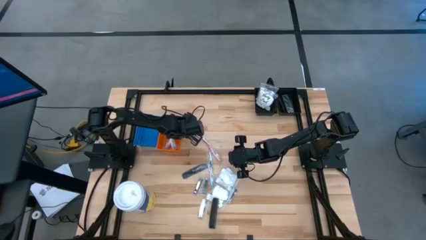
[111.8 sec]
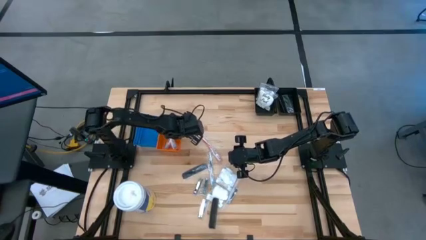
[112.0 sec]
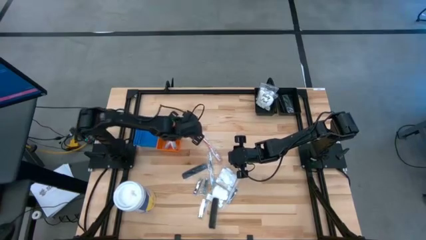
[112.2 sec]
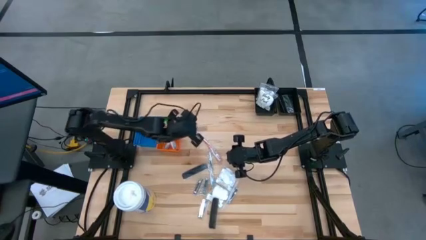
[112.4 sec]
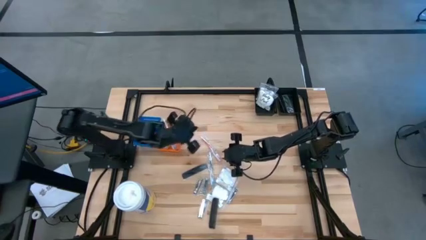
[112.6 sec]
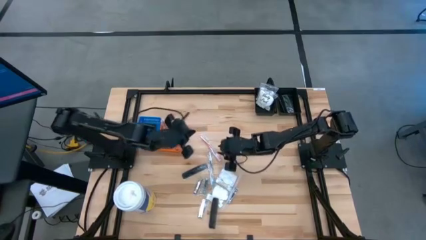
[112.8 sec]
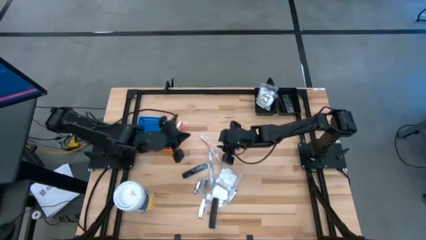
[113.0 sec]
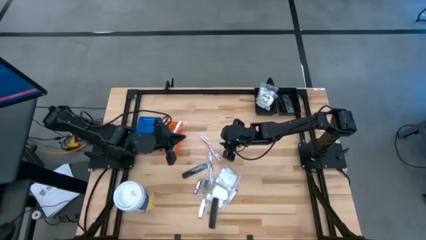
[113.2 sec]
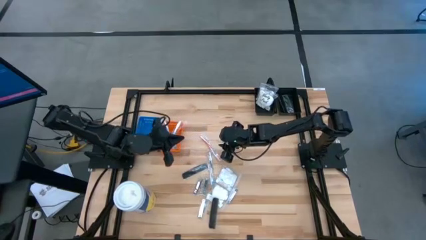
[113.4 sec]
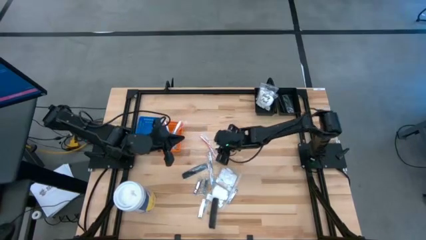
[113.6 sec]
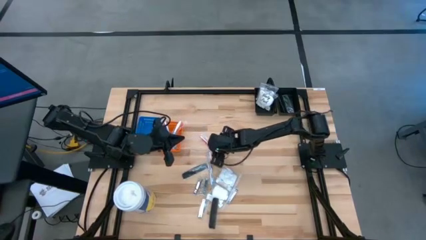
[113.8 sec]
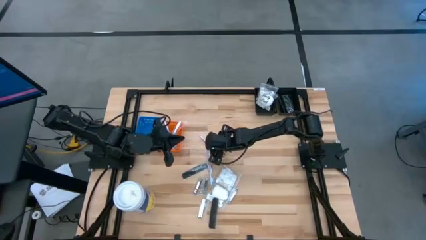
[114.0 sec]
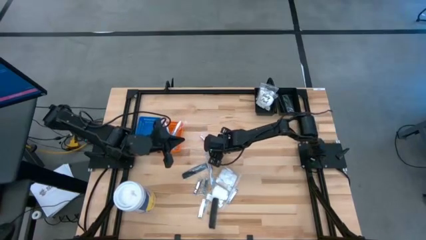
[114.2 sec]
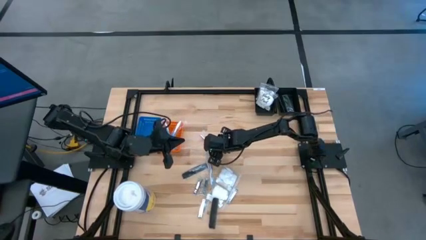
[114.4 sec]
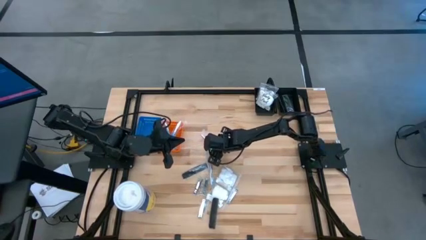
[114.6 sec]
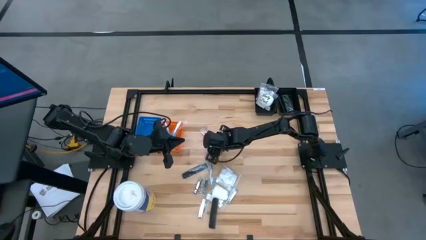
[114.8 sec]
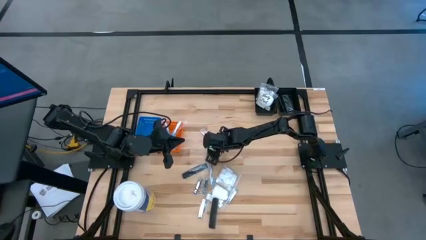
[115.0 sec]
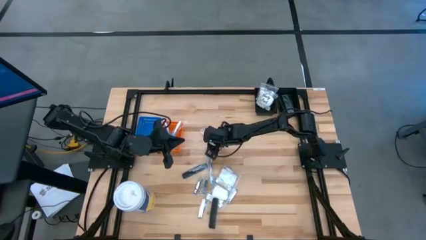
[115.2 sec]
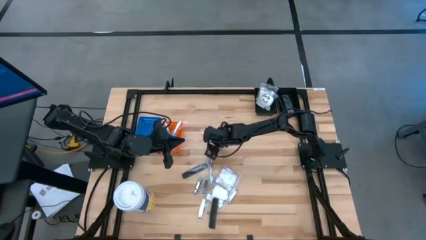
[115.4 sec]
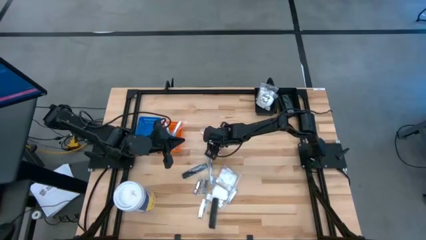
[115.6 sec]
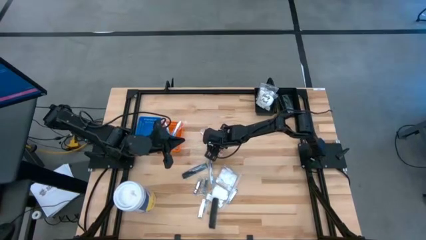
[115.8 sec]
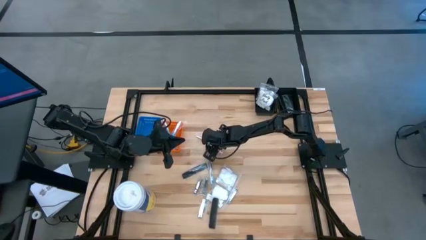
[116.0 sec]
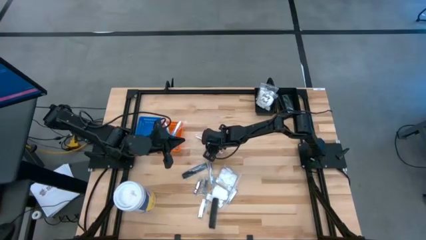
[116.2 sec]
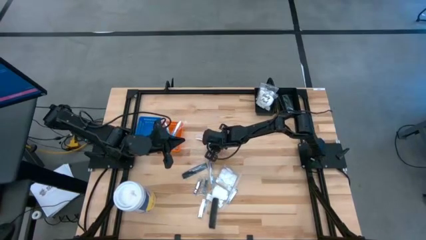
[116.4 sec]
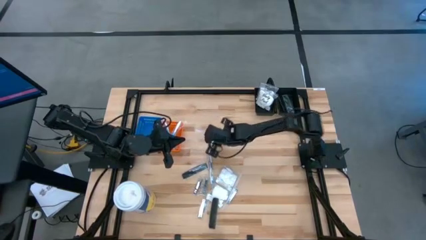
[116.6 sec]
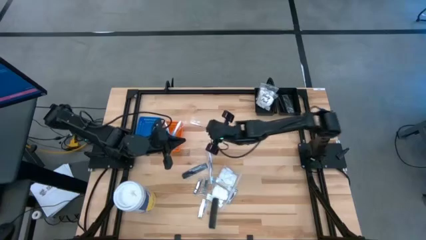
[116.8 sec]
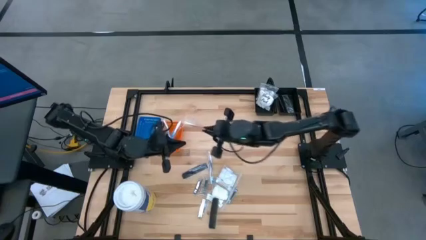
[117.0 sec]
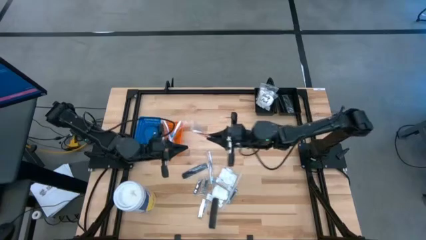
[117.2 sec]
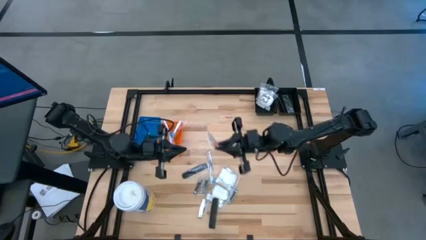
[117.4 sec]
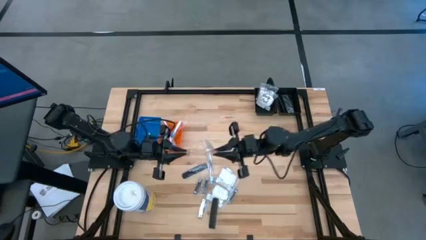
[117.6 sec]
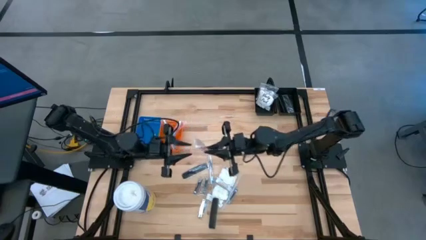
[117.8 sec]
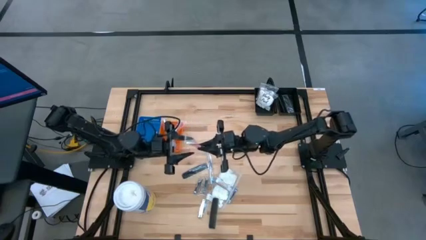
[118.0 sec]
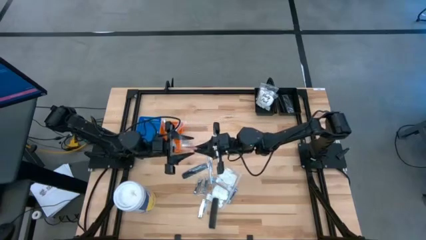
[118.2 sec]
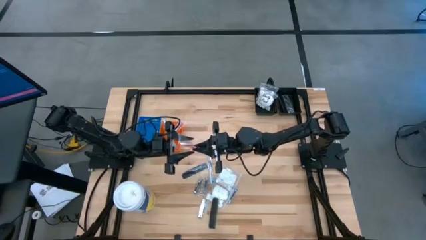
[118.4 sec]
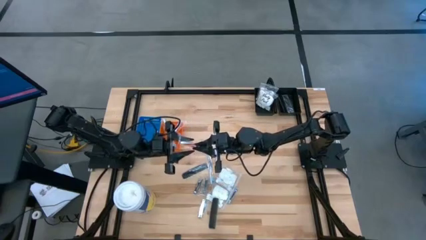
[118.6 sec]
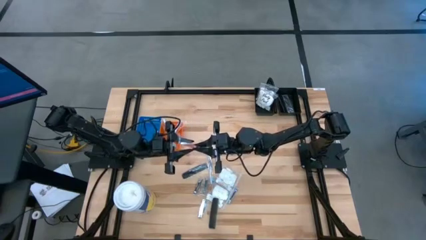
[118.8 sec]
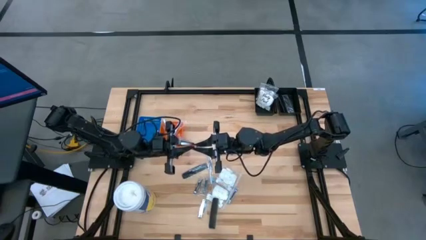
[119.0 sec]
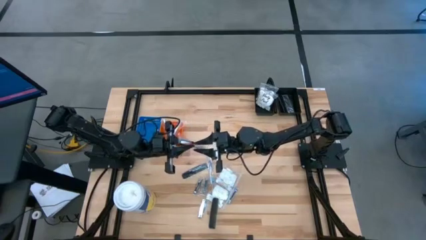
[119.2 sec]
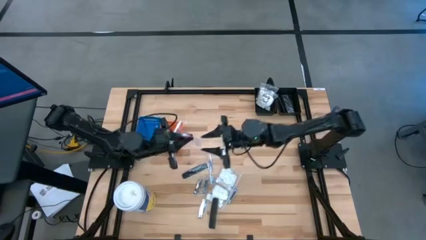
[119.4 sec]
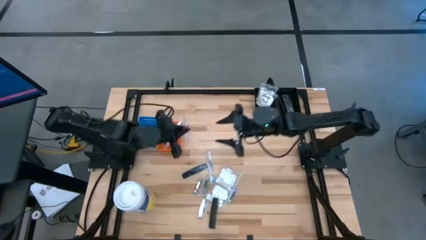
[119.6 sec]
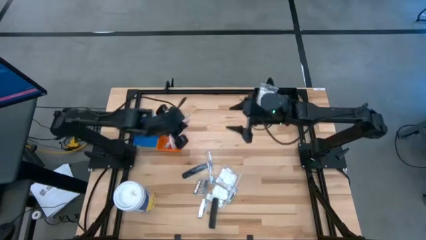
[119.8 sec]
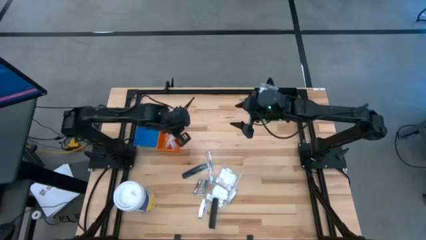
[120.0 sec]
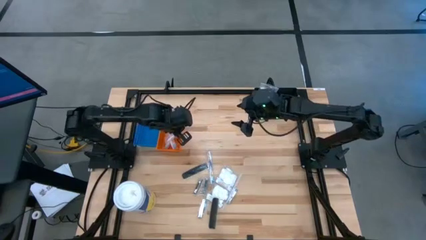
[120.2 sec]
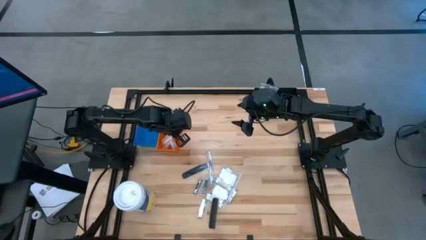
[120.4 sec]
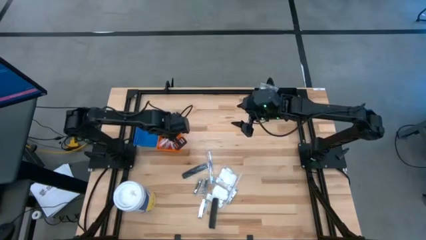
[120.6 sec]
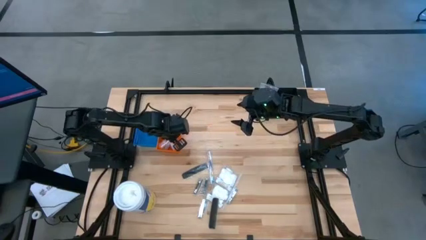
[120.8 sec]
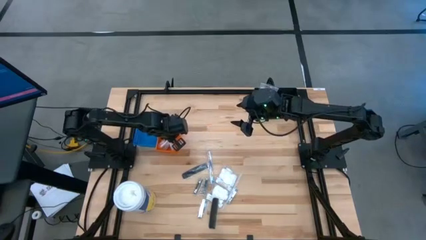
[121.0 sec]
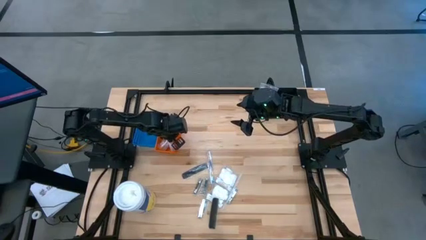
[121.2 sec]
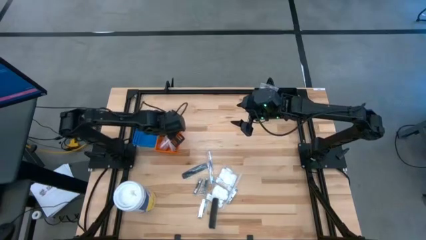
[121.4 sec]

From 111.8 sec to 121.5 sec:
Task: Pick & Place Travel size toiletries
Put the orange toothbrush into the orange bin

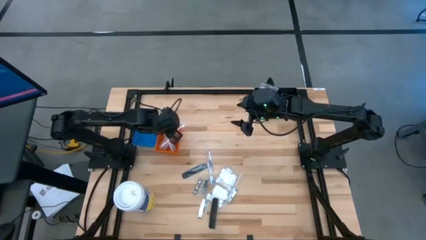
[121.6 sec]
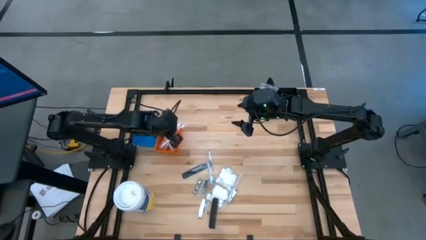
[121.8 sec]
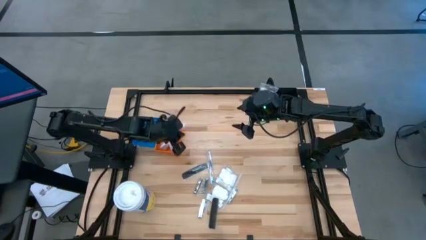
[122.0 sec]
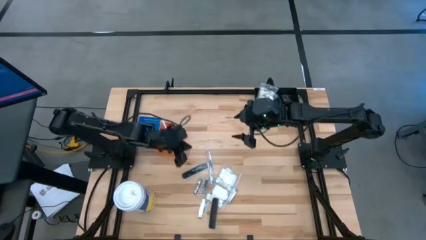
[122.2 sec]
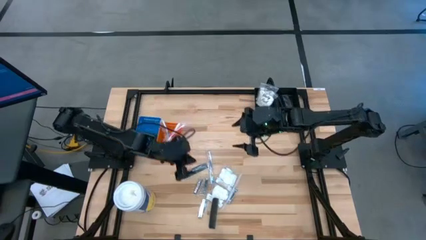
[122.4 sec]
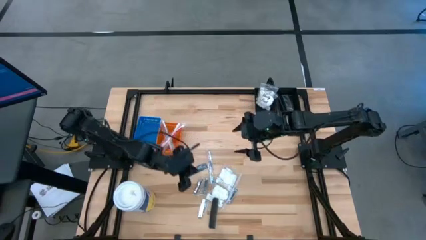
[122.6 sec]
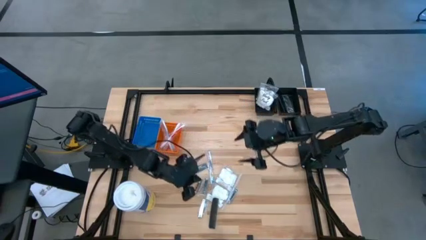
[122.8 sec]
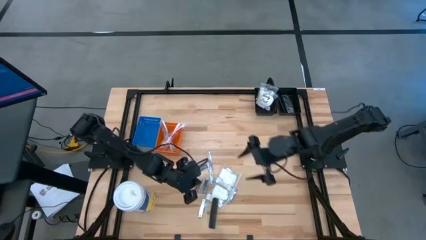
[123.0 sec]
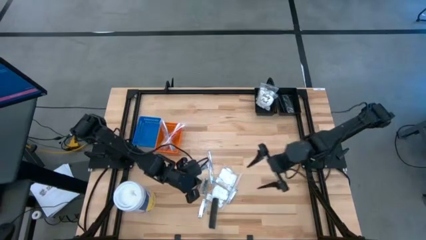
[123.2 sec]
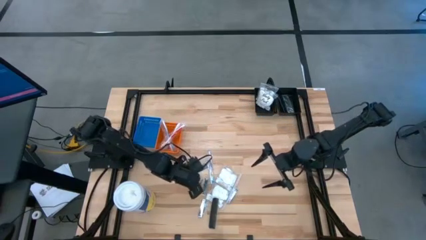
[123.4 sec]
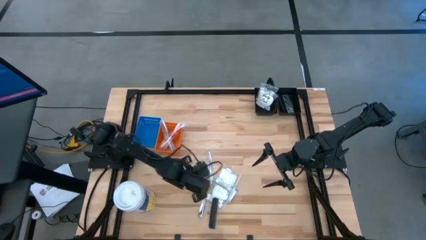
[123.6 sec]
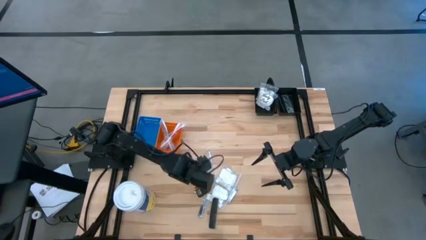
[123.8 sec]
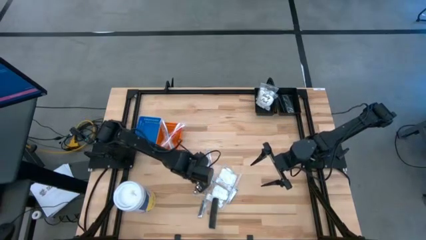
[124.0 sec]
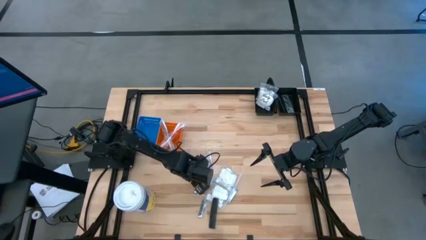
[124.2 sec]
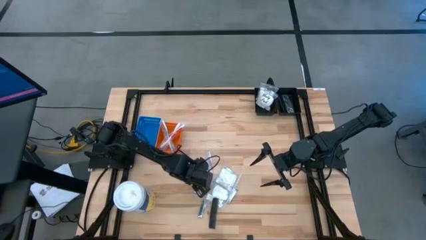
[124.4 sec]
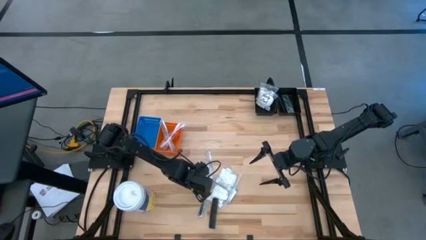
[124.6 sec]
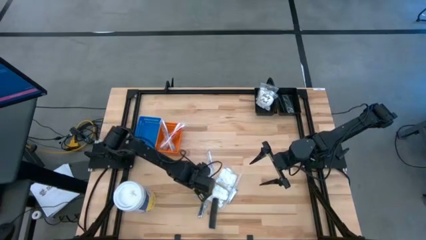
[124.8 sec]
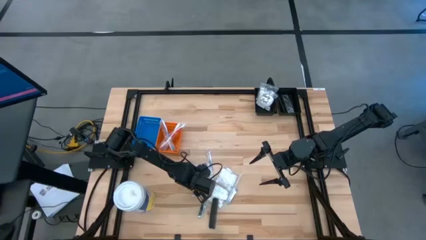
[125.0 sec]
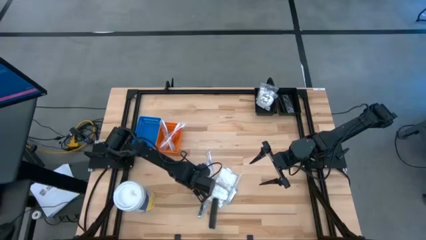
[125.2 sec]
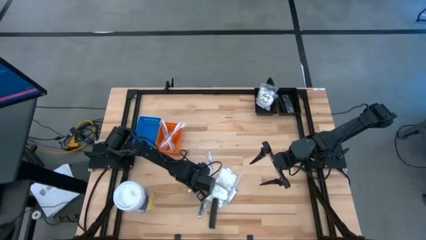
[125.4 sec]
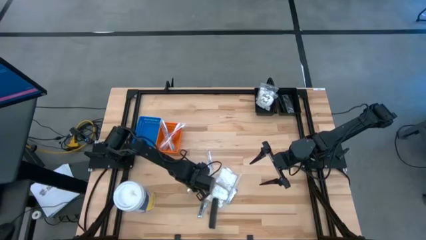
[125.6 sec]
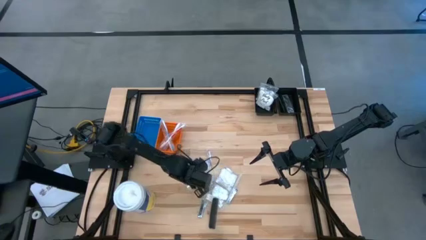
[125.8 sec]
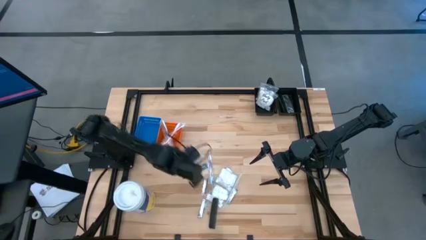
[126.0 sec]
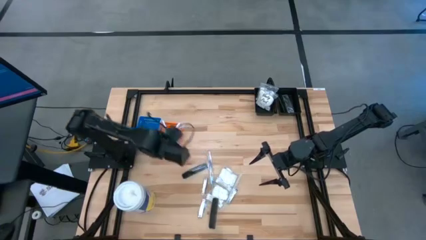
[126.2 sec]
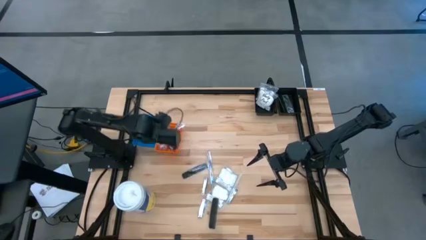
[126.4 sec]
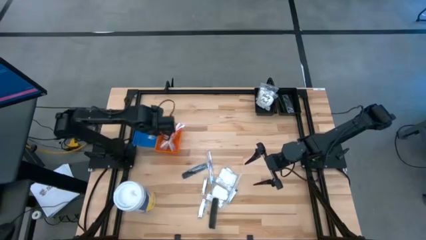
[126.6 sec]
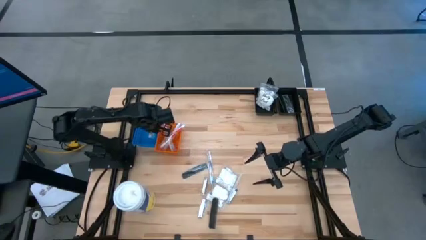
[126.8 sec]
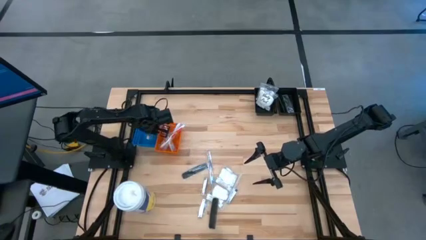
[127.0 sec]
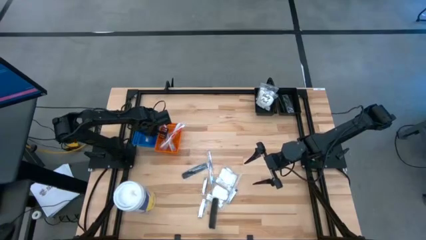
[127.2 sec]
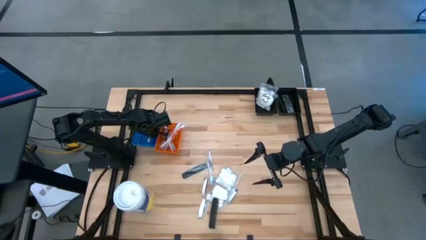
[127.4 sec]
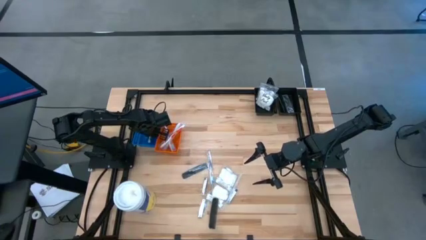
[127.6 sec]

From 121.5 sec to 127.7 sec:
Put the silver nail cutter into the blue bin

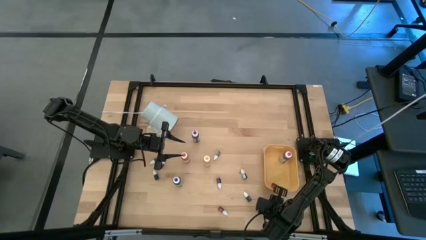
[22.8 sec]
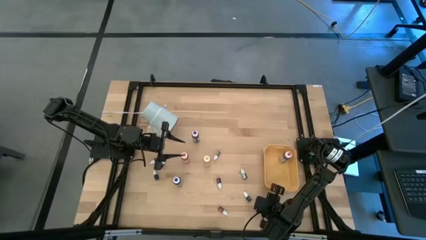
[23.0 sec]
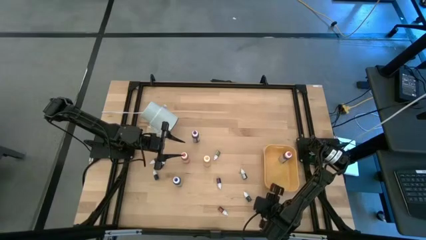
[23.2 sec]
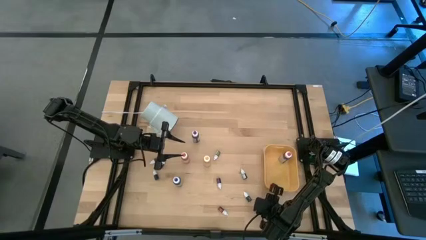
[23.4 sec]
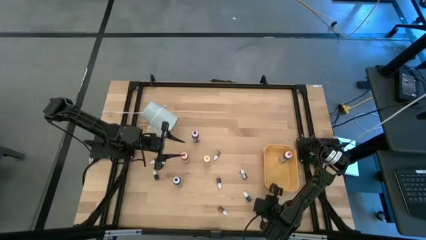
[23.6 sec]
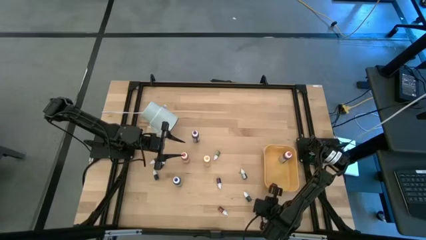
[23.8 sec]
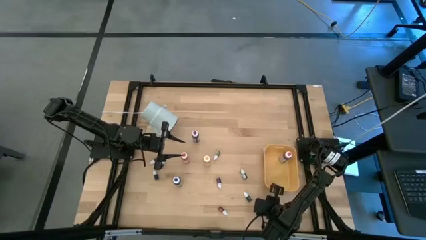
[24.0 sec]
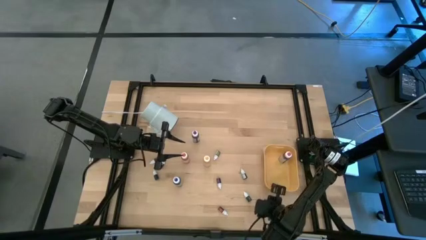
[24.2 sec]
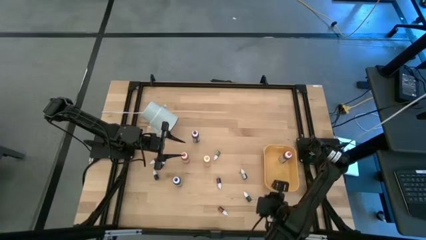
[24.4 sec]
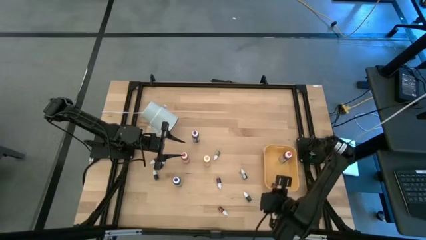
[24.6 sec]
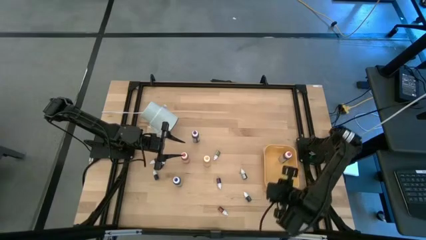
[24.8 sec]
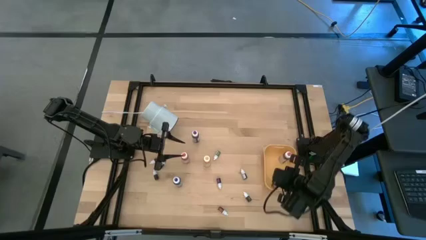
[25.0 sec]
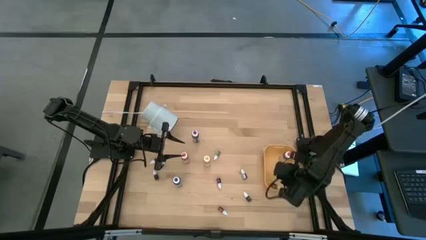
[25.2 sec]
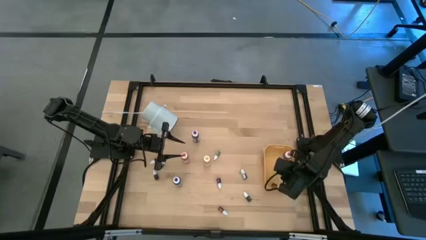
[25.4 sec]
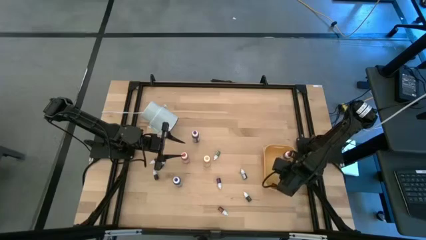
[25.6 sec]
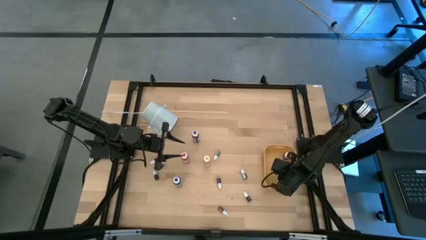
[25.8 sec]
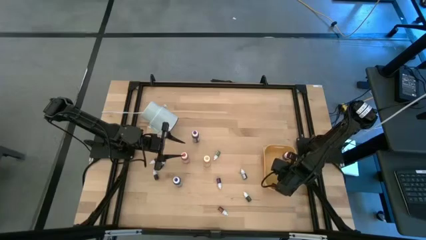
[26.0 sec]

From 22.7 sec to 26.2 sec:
Task: Pick & Place food coloring
Put the small red food coloring bottle into the yellow bin
